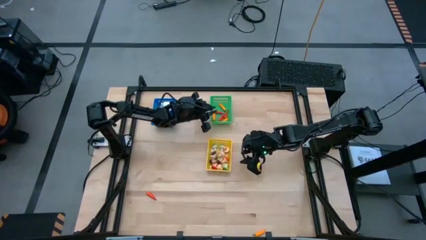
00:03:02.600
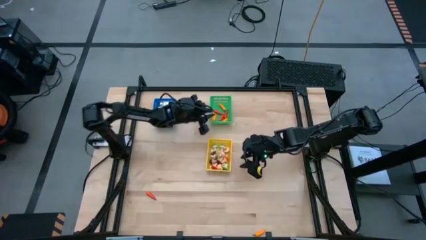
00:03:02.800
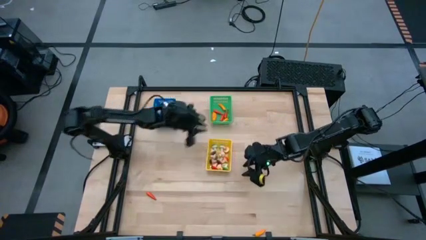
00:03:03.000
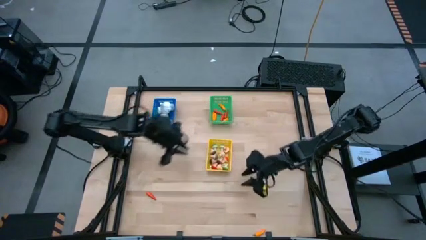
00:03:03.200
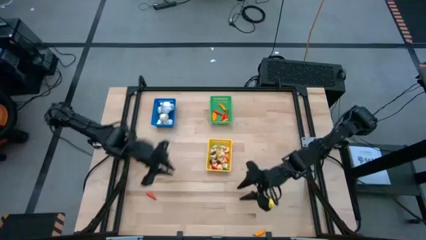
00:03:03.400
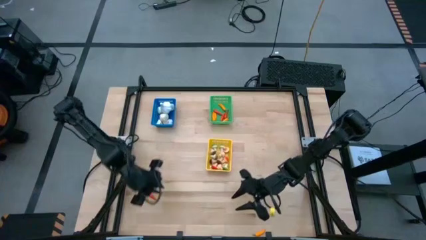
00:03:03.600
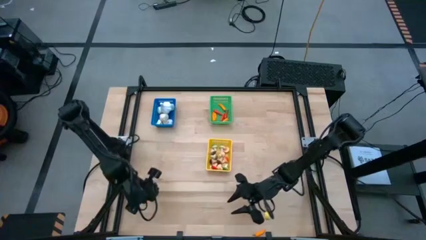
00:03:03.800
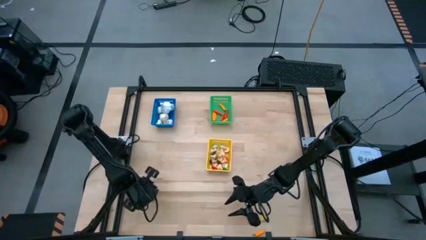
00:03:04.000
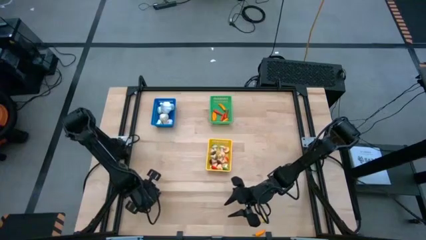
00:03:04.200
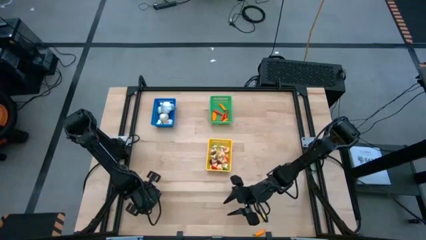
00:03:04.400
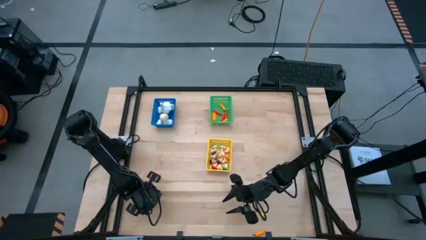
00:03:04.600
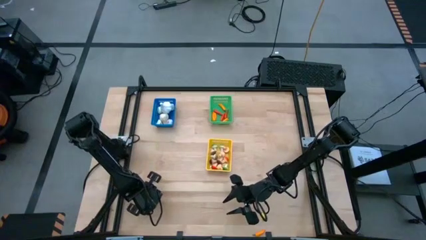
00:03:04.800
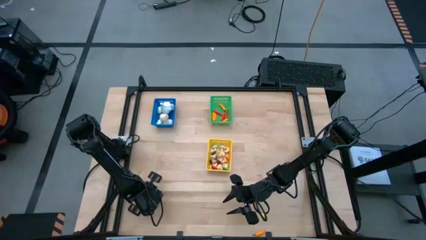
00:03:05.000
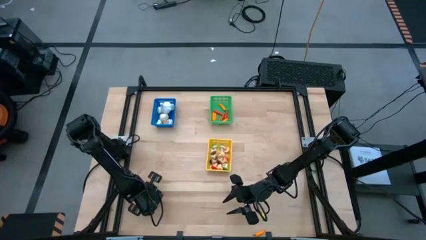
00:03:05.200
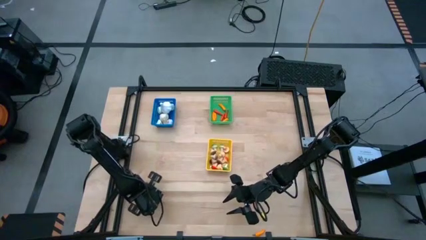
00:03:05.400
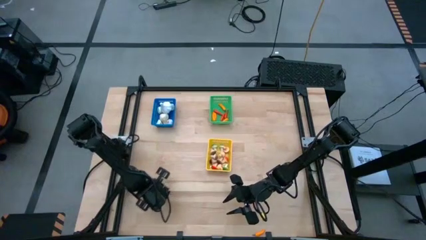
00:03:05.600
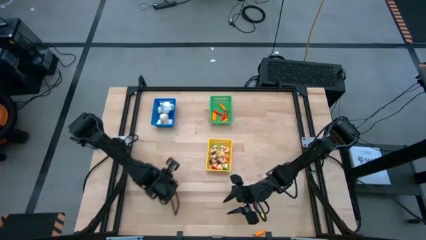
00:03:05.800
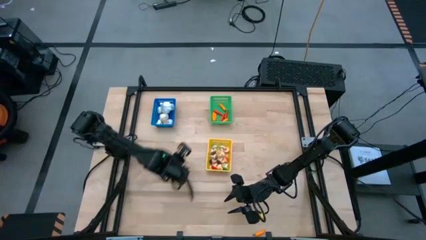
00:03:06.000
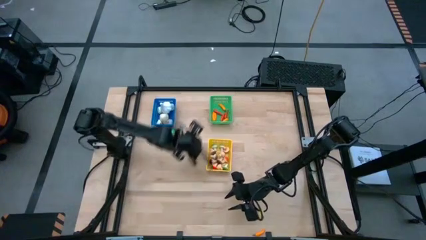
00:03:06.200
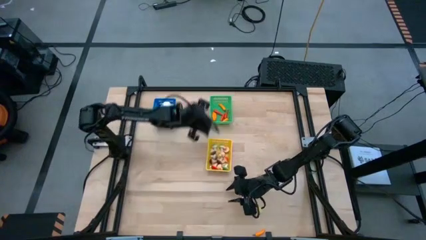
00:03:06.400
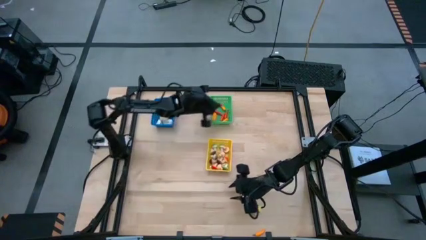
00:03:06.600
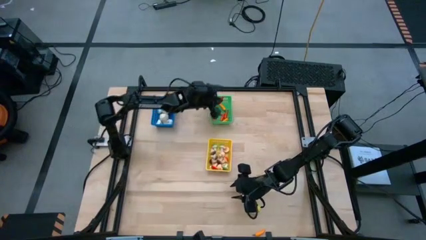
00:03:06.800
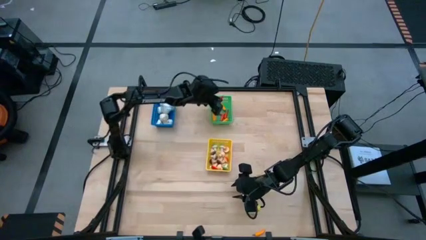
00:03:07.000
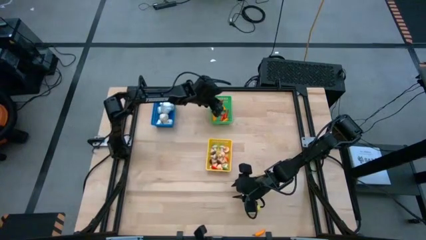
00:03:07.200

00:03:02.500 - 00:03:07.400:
Task: Sort produce into baskets
Put the red chili pepper into the green bin

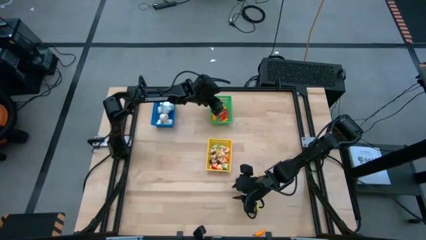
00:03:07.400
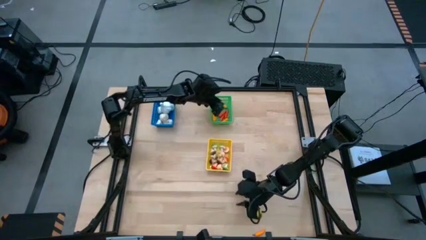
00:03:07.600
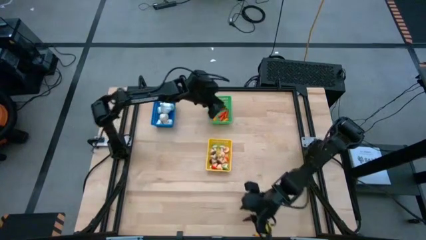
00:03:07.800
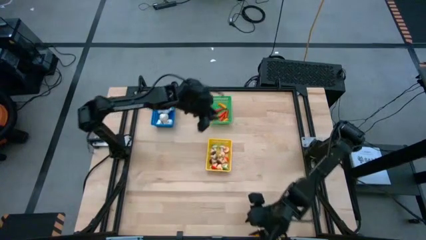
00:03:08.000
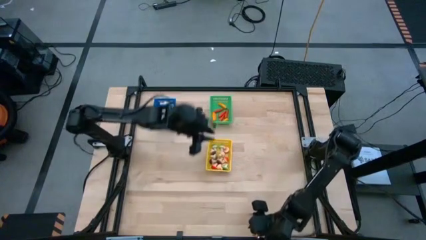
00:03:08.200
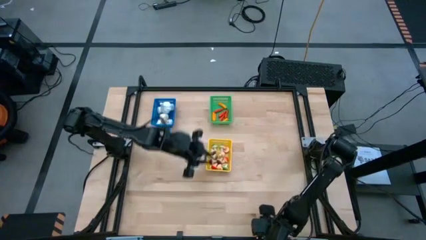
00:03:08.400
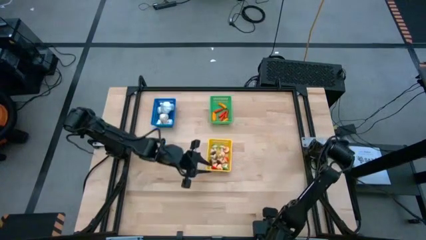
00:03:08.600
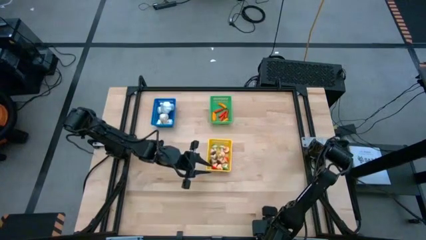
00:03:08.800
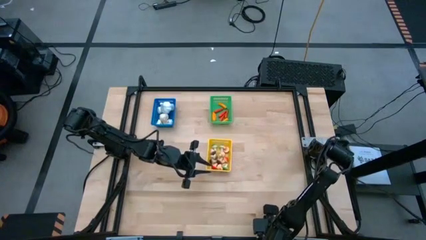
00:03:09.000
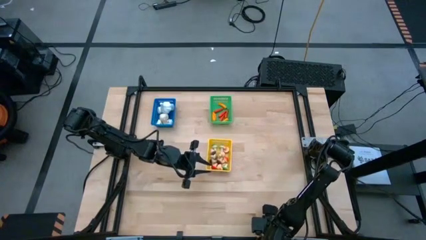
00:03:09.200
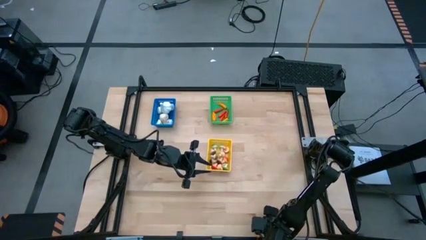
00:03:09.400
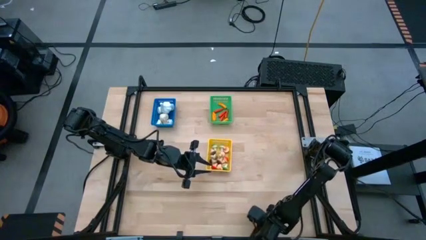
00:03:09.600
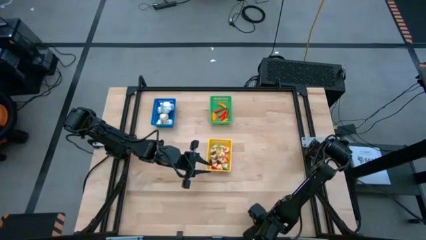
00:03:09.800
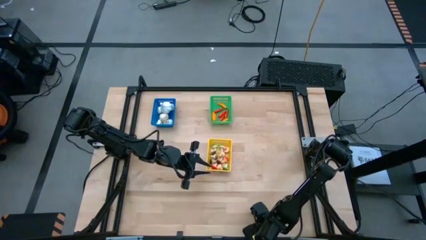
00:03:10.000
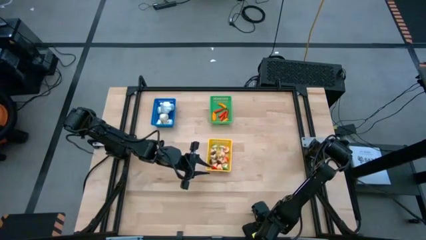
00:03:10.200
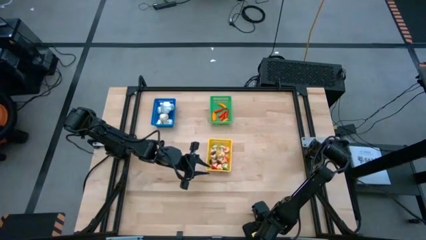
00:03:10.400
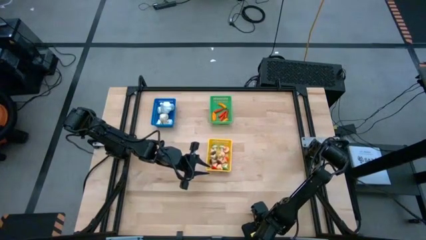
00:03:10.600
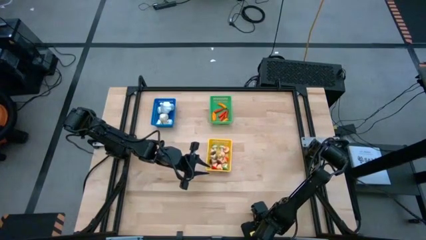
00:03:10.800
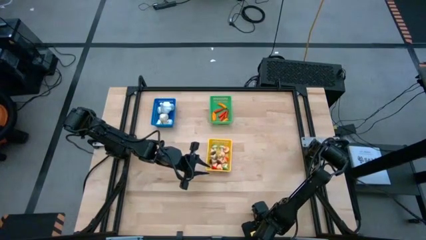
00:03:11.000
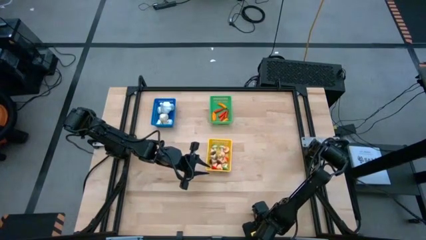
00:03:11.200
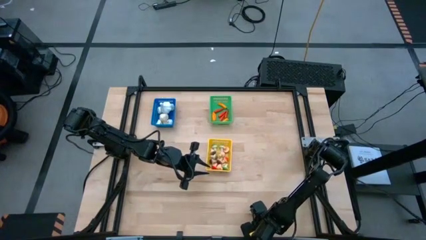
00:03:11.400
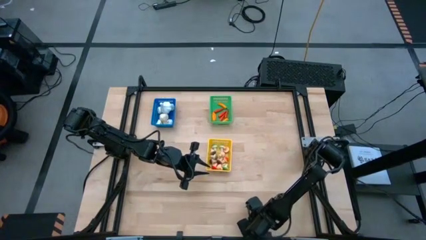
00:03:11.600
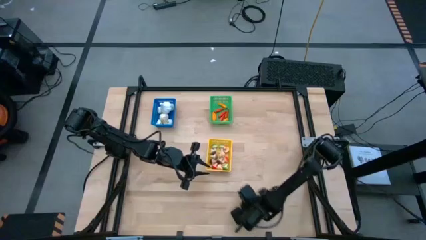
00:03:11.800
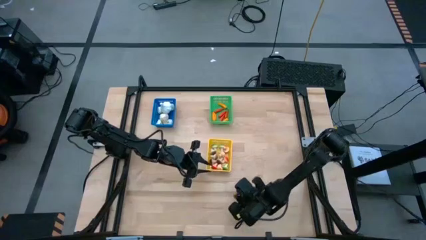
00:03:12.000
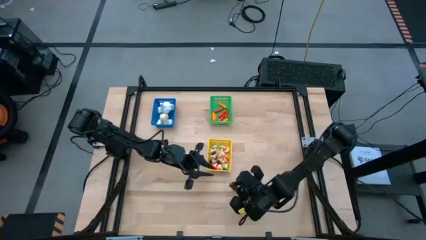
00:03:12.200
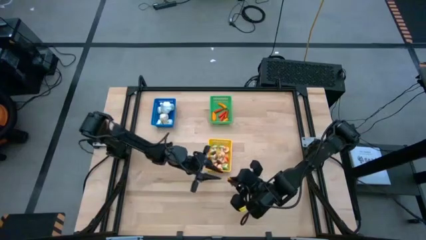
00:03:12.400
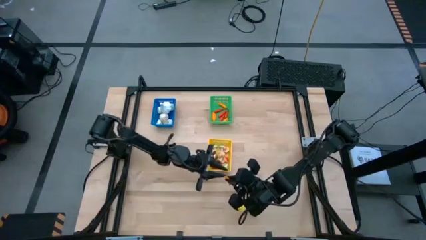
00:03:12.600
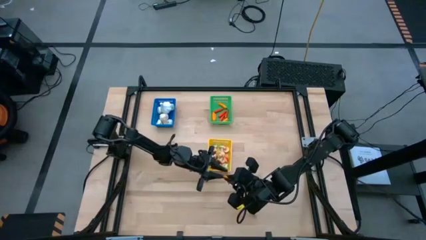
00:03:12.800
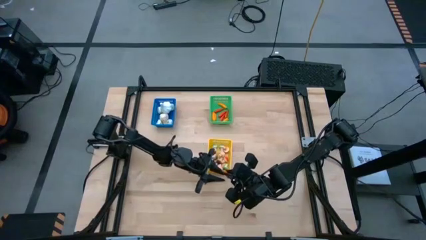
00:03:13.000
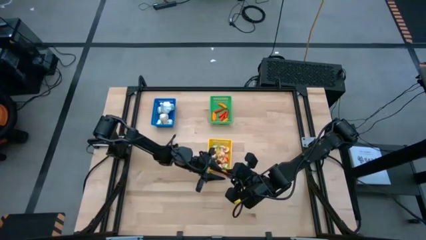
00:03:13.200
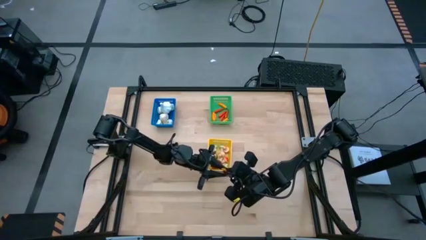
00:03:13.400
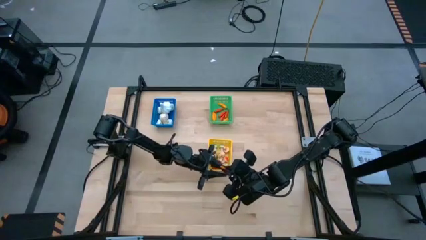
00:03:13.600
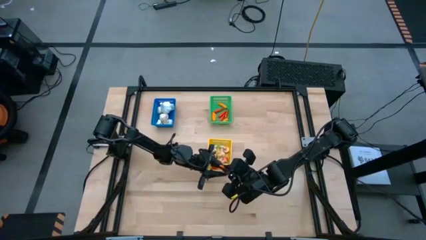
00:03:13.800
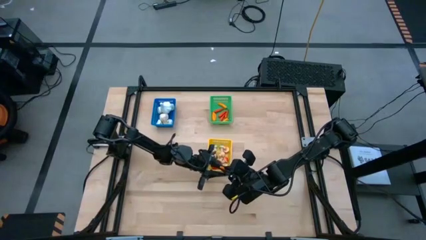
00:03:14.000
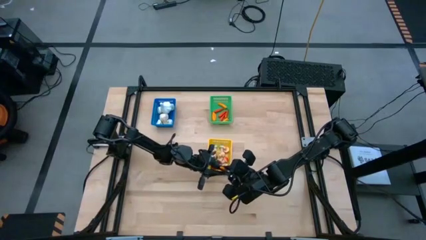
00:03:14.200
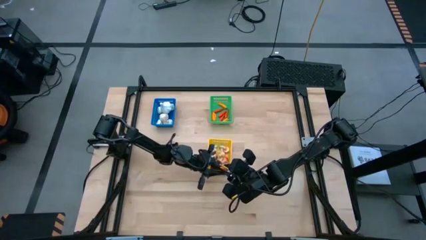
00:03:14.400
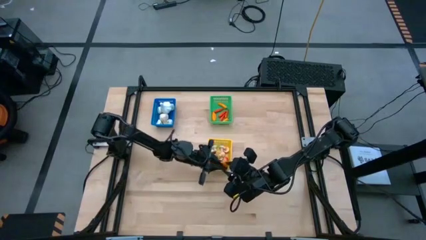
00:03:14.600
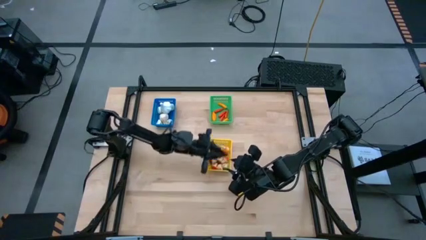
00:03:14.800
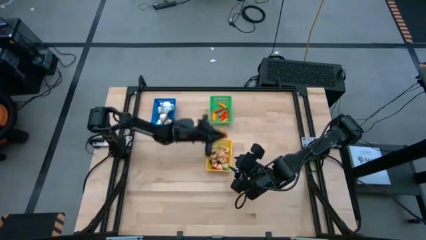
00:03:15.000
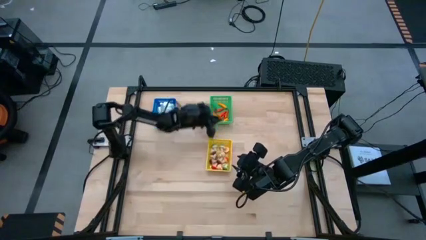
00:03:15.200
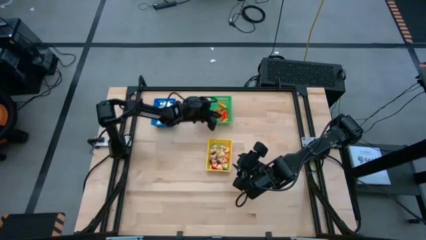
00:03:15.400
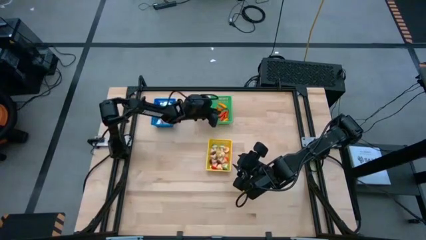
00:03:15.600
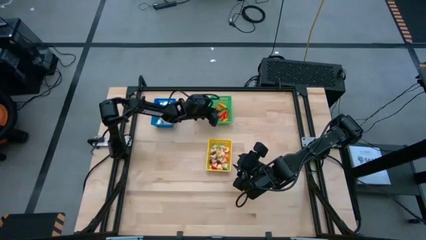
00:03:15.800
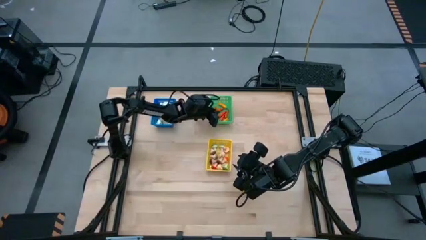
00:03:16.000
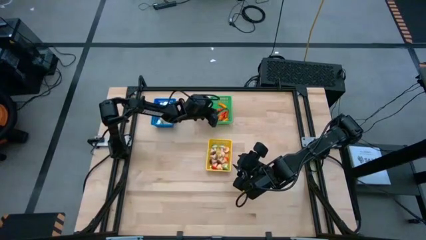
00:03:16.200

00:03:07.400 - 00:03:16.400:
Put the orange chili pepper into the green bin

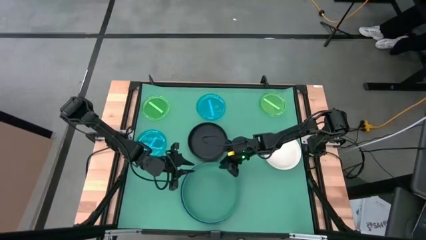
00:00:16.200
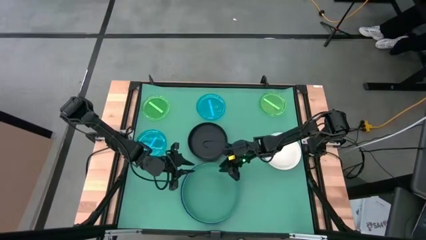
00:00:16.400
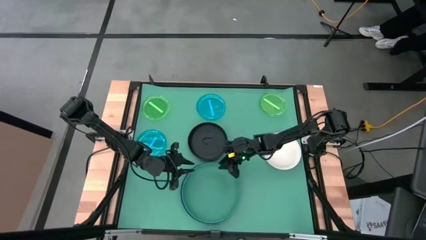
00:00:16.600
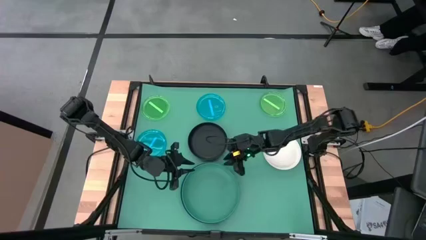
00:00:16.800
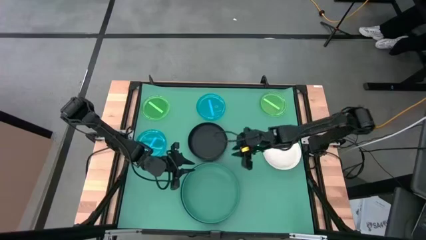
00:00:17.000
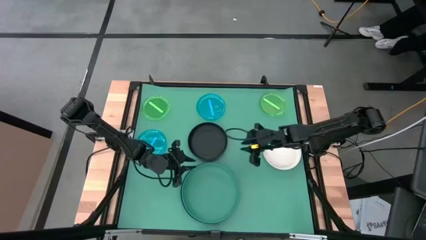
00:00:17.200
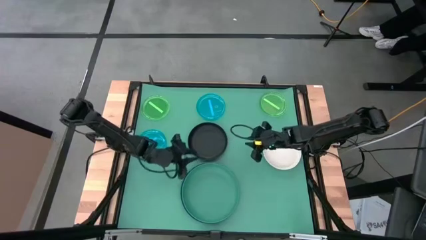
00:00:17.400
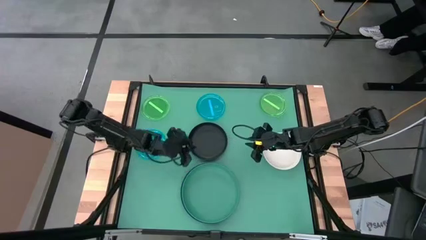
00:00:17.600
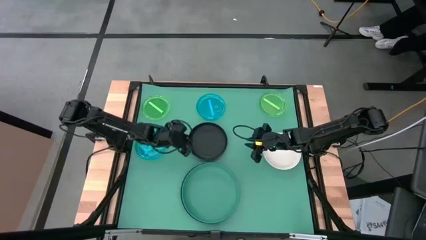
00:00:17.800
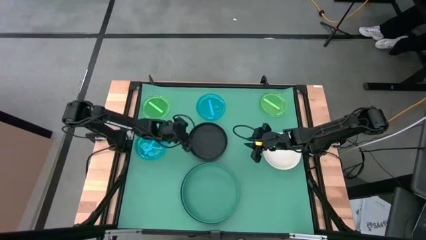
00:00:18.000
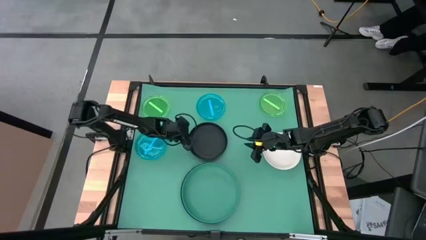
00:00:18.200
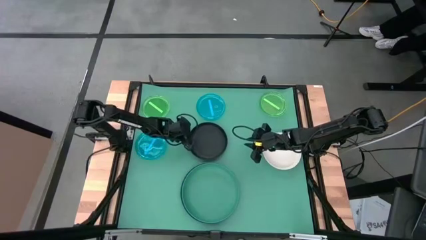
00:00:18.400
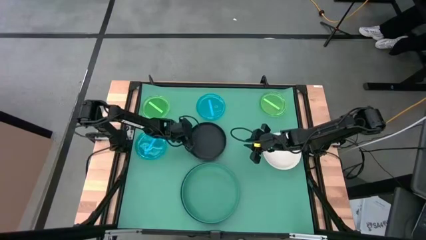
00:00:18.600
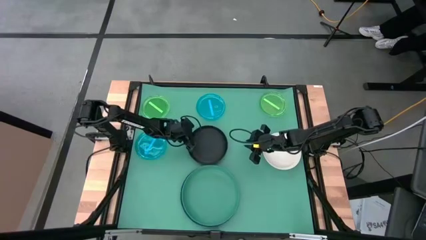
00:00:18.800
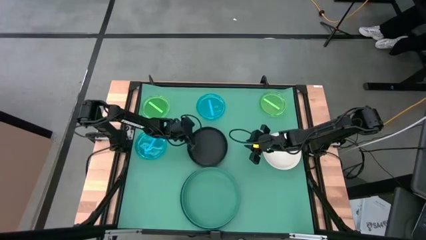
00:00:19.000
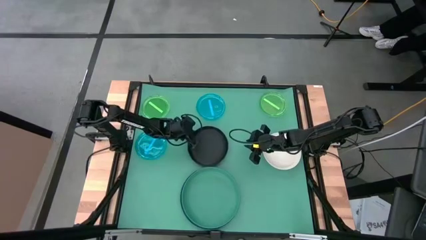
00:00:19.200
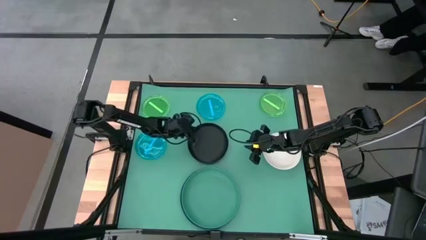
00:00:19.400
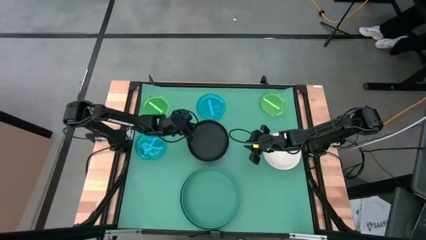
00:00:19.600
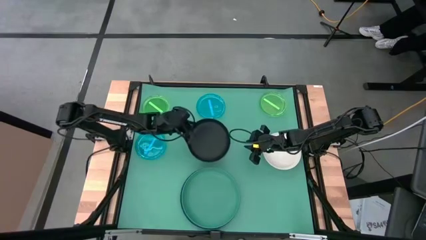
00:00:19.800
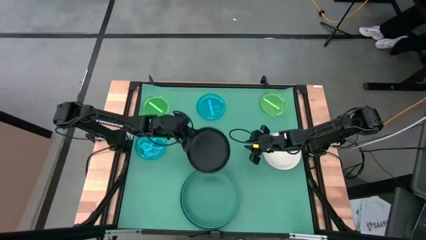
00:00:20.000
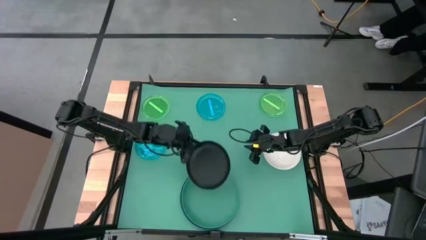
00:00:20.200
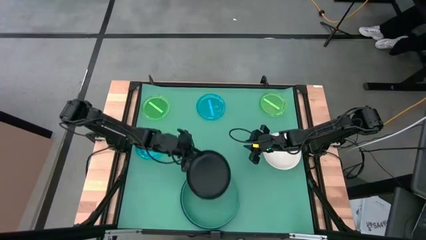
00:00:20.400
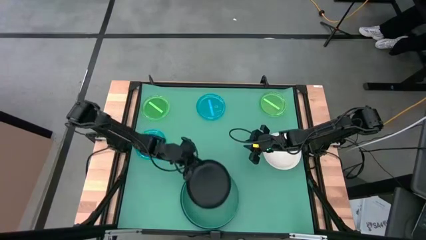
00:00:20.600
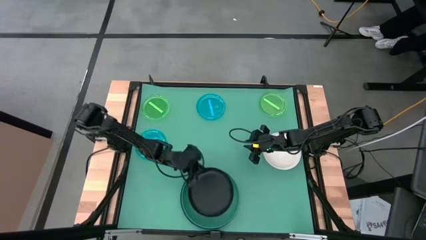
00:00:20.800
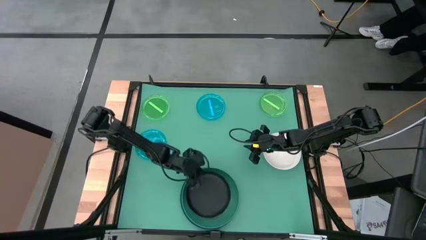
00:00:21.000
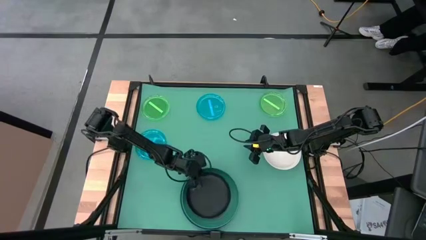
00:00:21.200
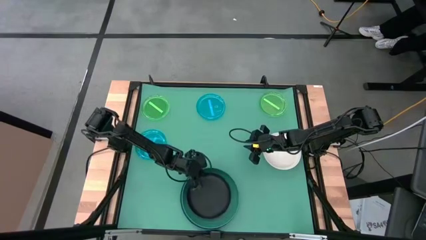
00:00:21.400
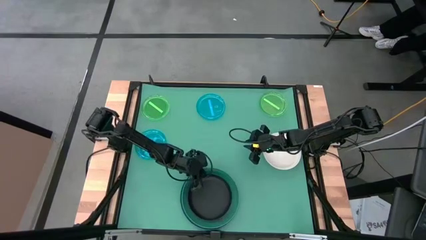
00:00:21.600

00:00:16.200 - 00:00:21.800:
Task: Stack plastic plates
Stack the black plate on top of the dark green plate
